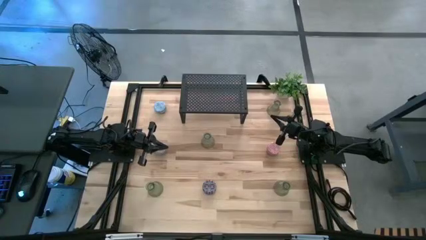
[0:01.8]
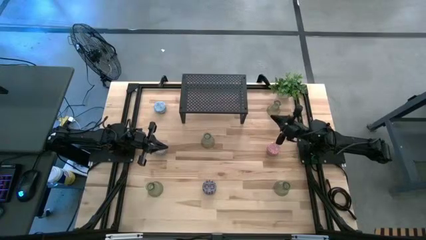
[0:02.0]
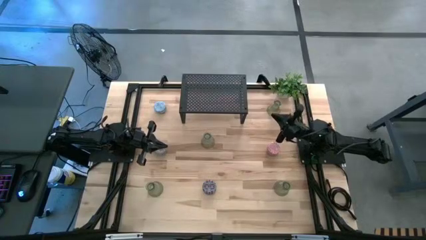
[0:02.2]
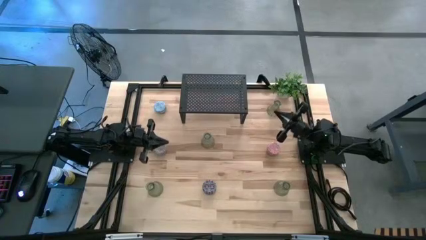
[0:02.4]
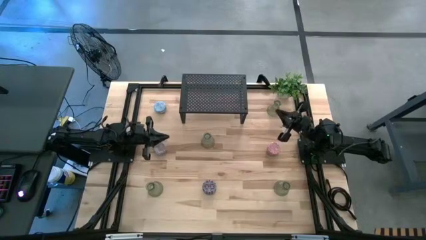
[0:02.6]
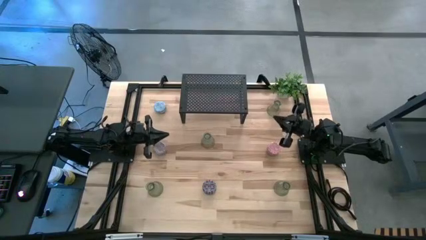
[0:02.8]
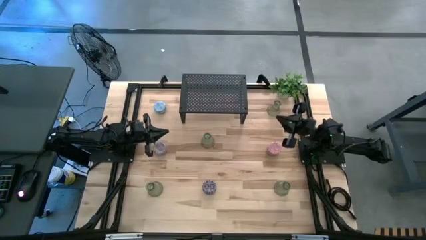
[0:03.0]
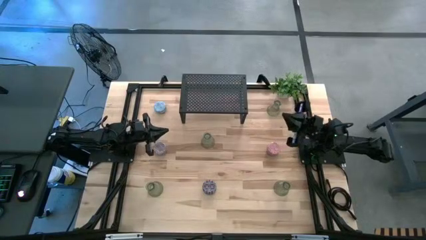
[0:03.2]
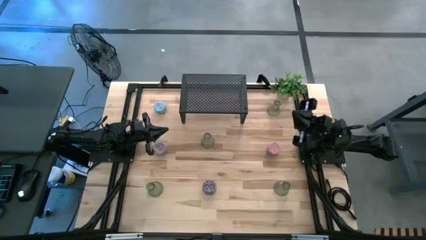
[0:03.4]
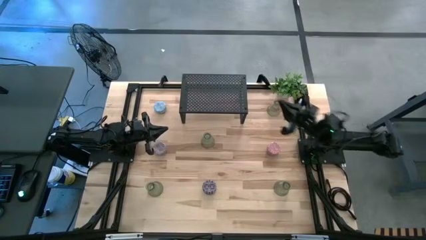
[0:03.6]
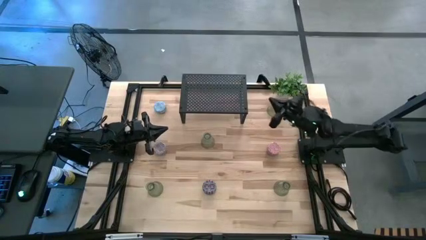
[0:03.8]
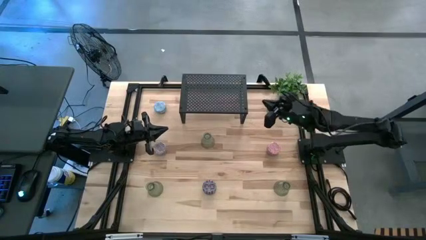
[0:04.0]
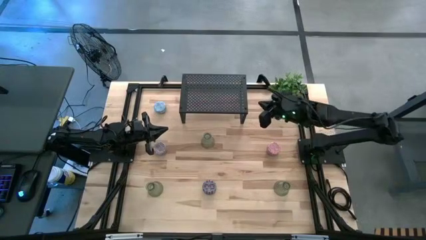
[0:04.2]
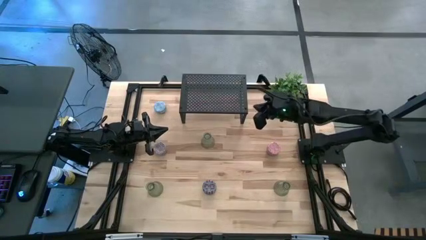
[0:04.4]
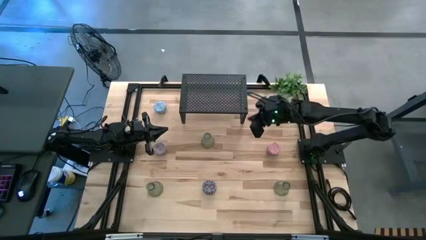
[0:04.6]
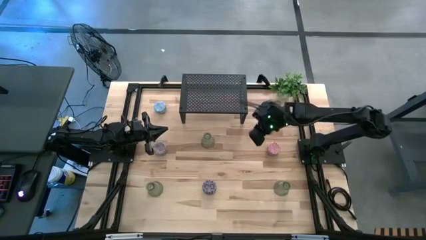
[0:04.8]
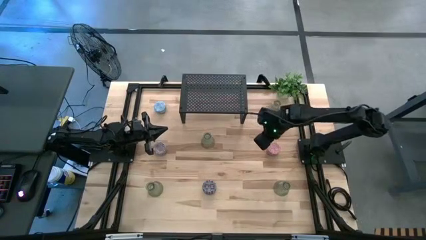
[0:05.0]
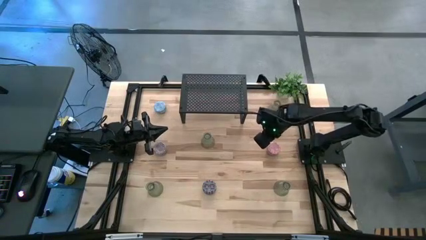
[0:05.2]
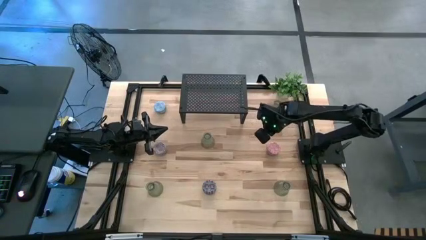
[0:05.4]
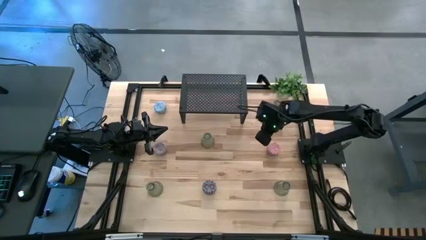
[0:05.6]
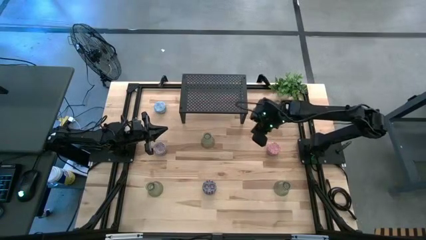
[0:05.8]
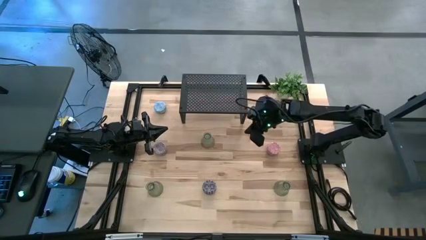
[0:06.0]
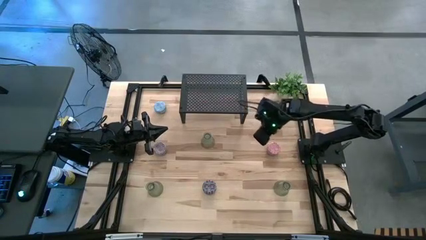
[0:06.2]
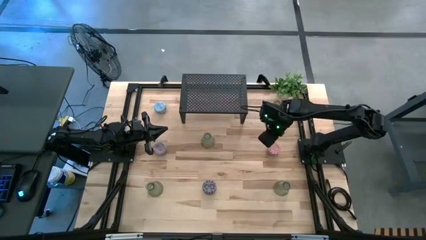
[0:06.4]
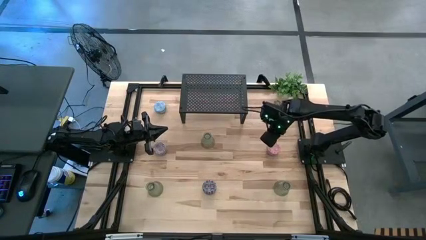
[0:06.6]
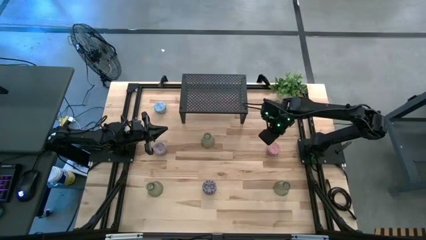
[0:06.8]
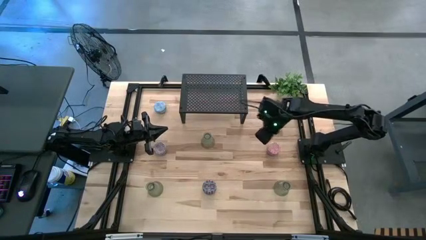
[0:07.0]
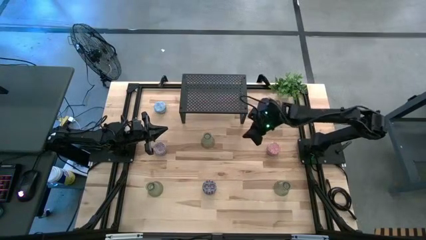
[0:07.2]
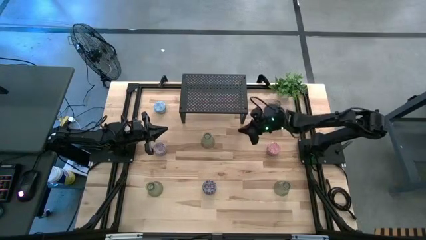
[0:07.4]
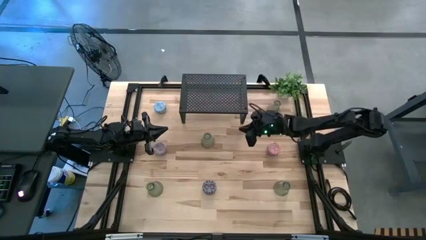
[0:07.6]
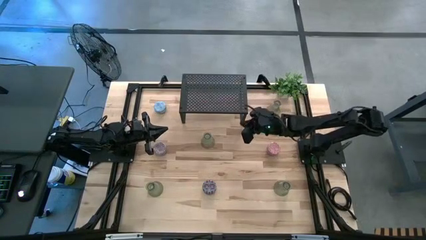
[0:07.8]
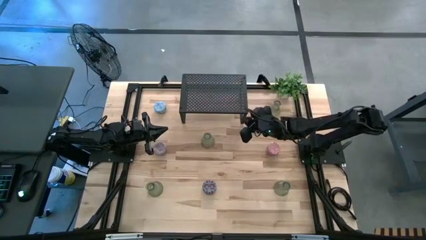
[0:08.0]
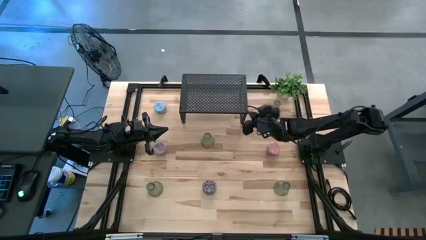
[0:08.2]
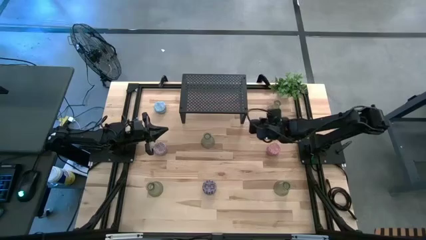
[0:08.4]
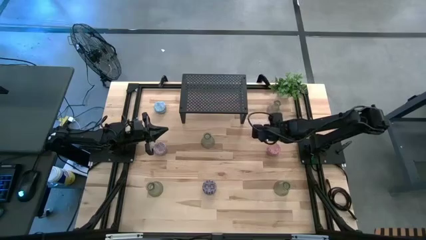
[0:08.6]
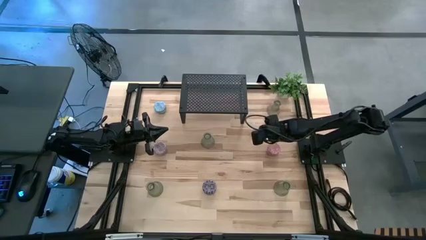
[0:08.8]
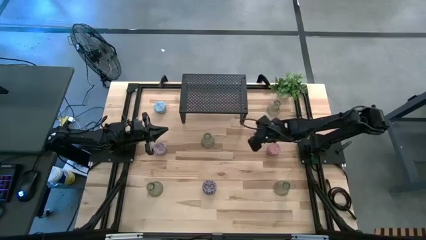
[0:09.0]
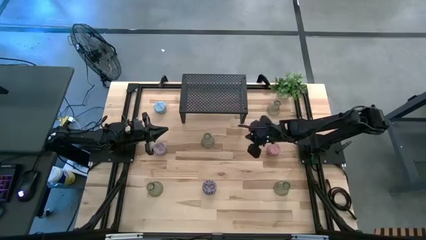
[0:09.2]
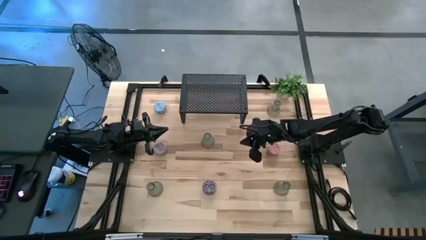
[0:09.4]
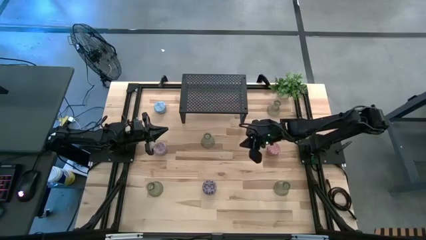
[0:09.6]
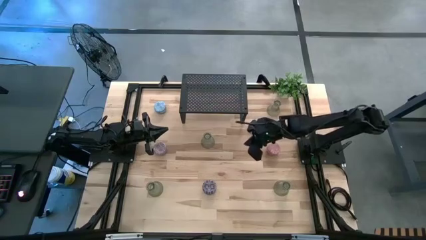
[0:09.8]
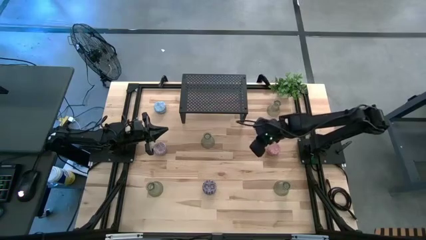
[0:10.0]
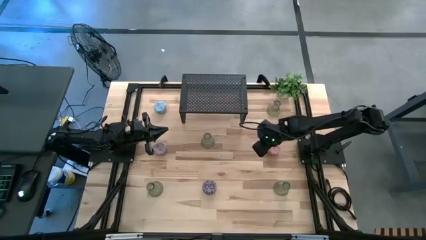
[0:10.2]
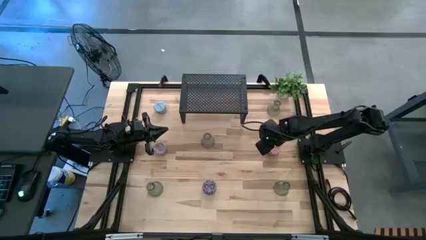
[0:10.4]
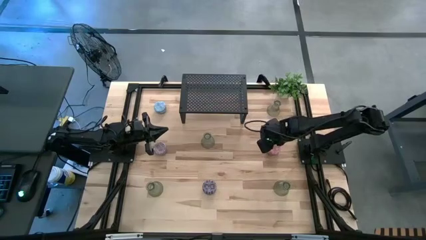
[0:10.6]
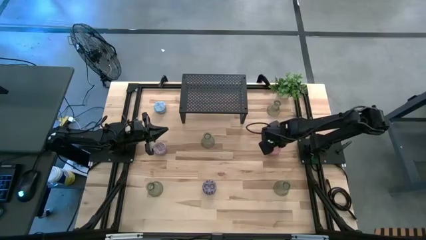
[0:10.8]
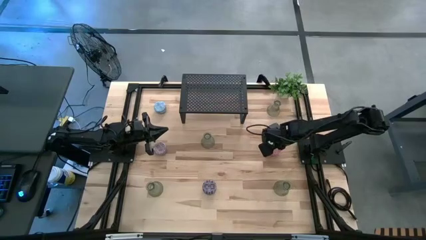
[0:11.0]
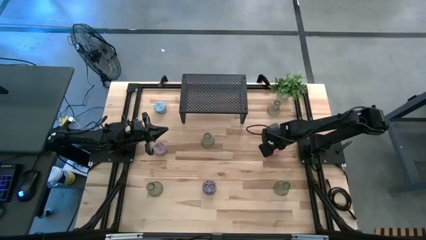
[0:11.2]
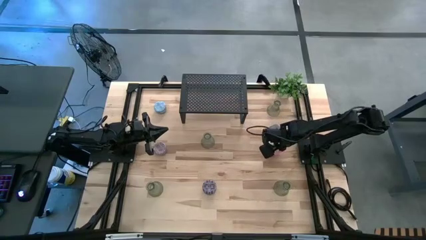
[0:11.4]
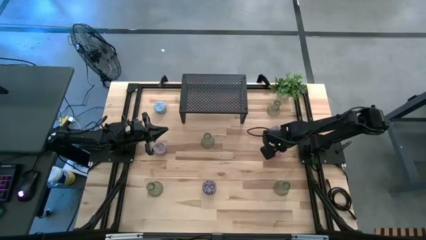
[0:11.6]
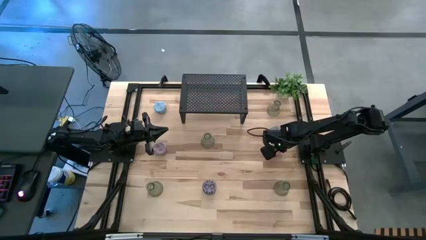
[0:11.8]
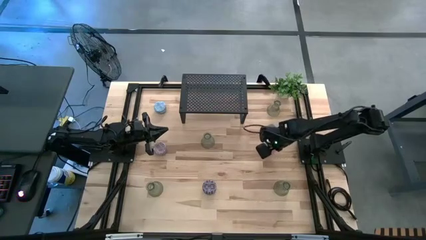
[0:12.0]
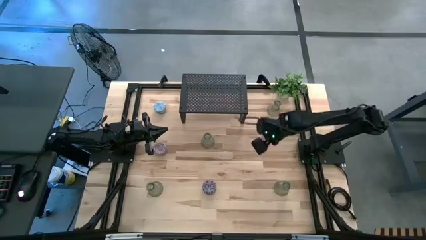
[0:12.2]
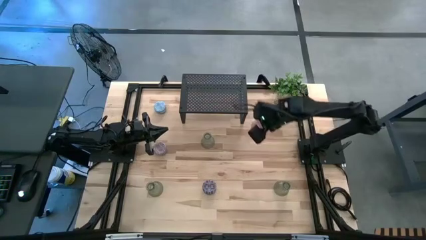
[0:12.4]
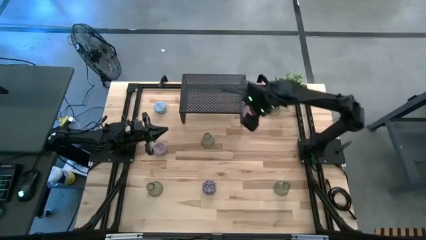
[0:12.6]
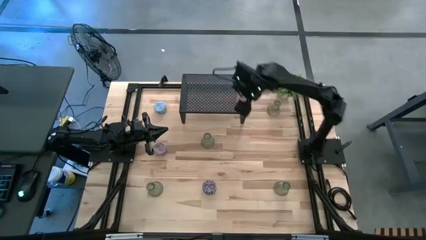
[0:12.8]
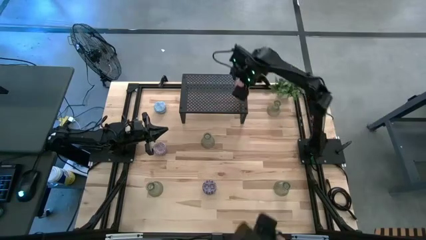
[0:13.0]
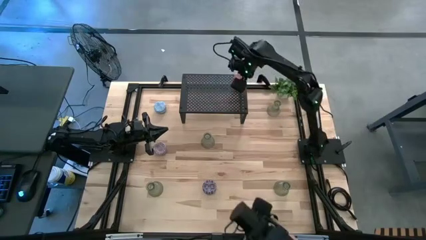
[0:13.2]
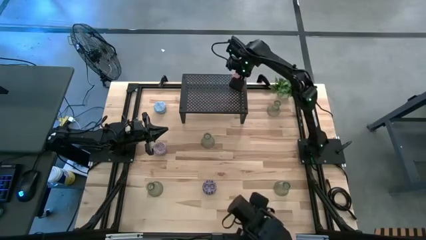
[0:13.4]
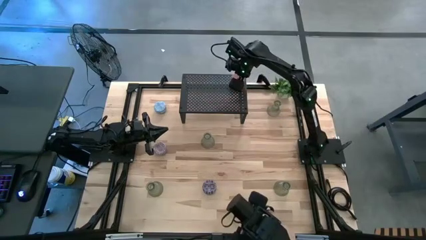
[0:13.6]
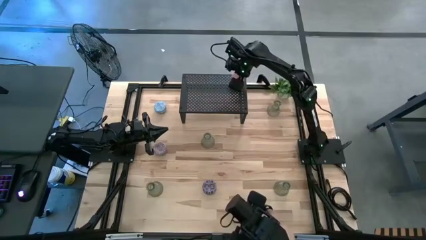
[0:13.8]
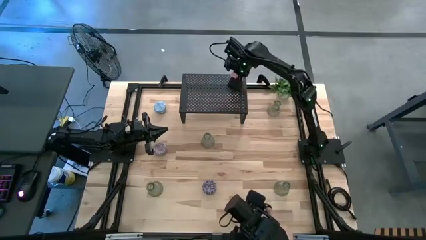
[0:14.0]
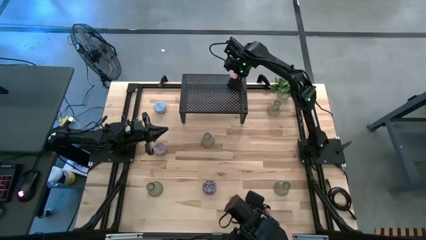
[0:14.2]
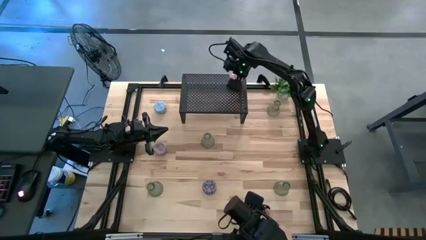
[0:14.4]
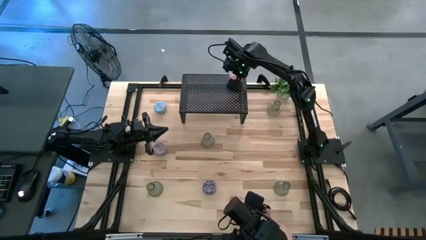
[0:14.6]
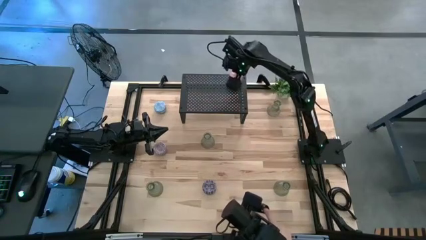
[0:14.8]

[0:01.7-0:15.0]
Task: Pick & Place candle stick holders
Put the pink scented candle on the shelf
